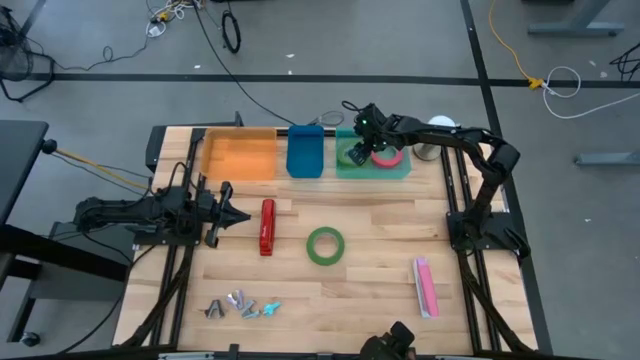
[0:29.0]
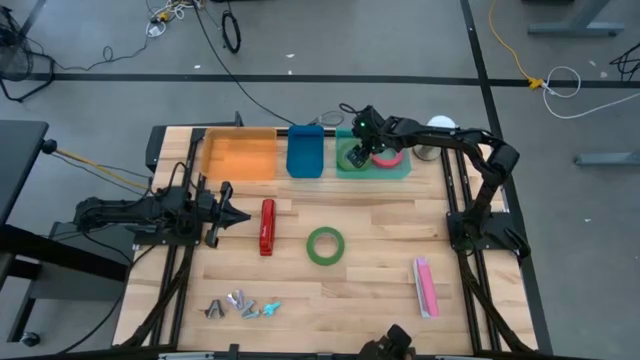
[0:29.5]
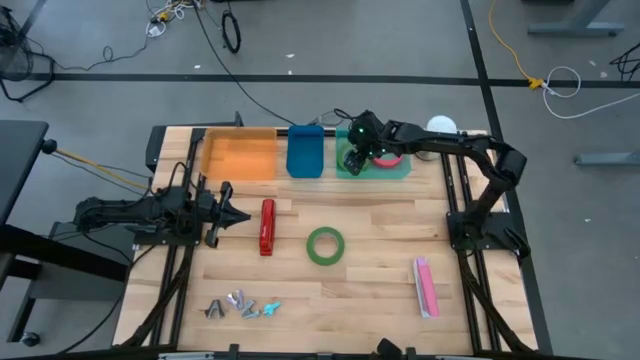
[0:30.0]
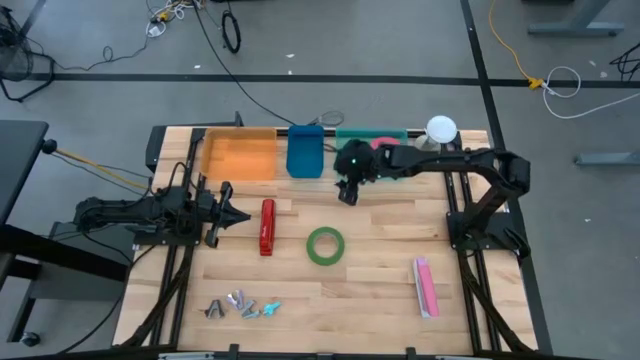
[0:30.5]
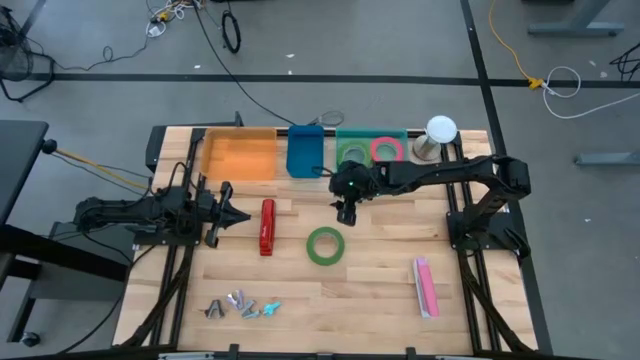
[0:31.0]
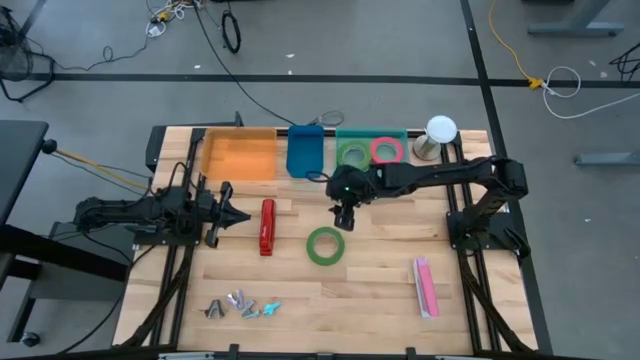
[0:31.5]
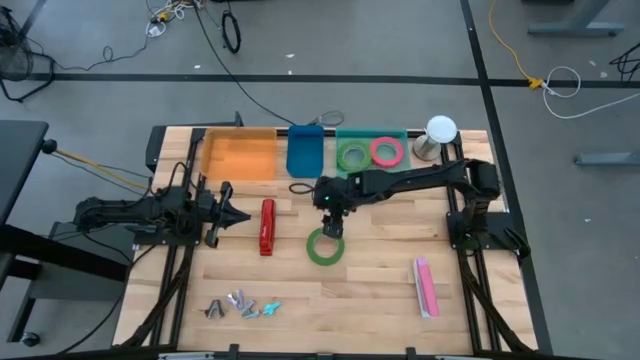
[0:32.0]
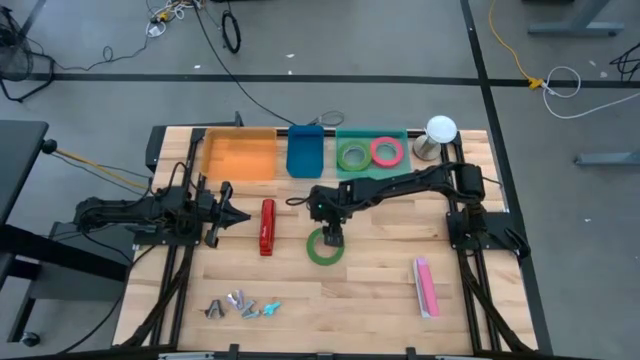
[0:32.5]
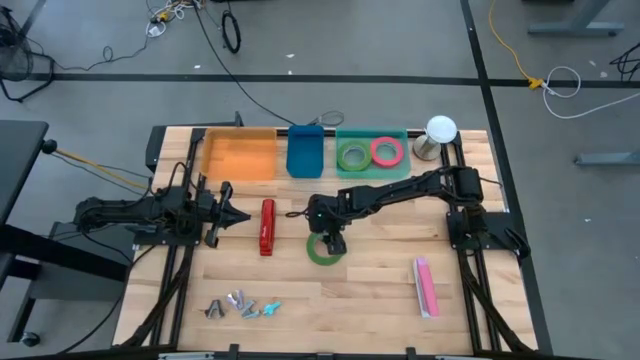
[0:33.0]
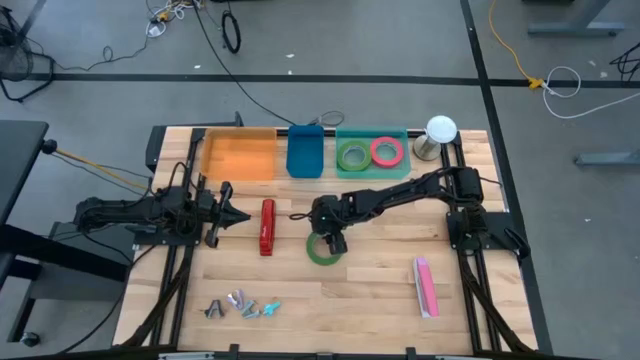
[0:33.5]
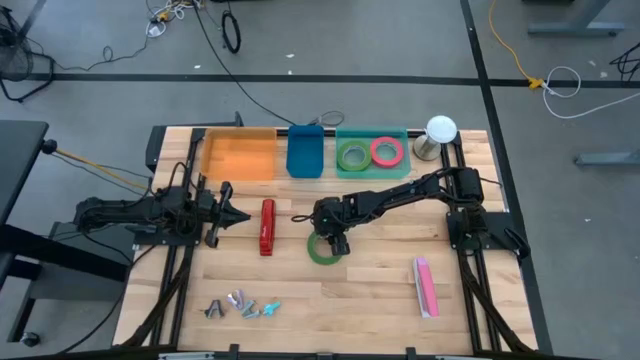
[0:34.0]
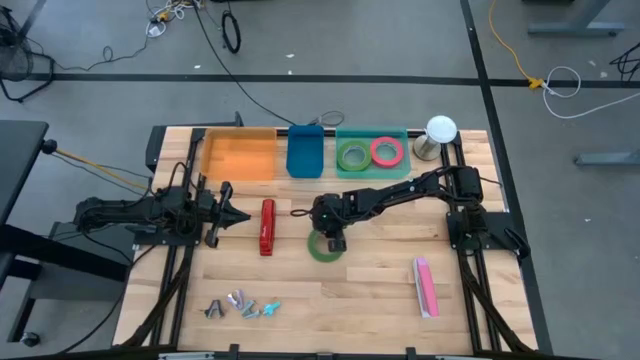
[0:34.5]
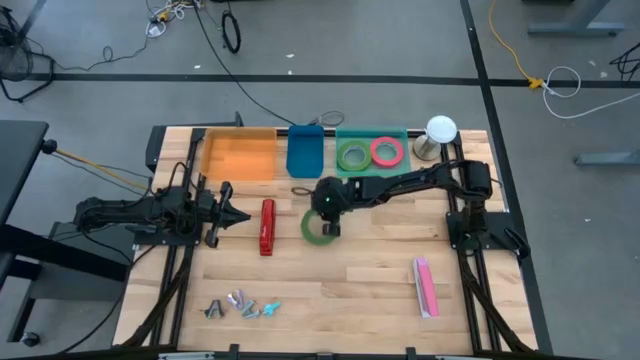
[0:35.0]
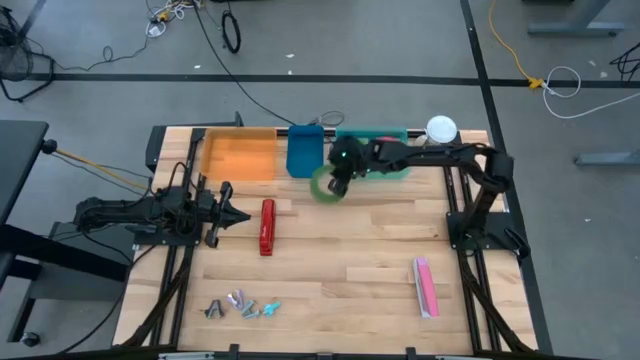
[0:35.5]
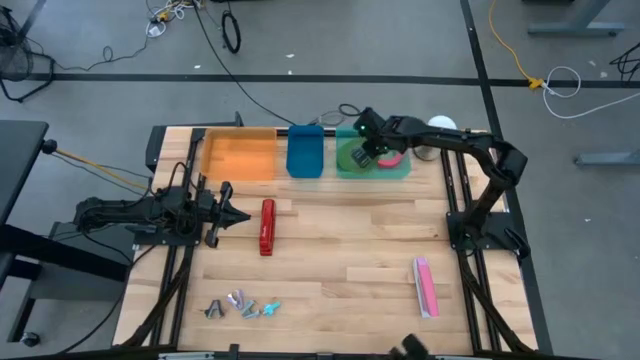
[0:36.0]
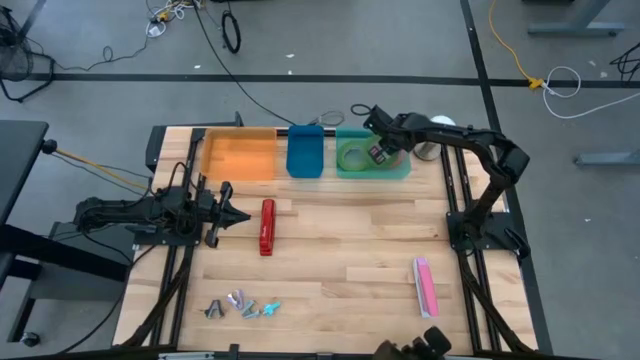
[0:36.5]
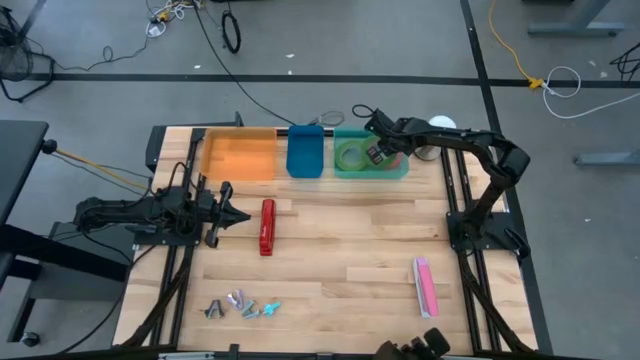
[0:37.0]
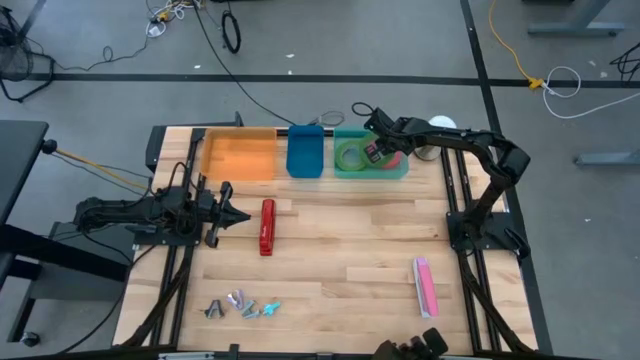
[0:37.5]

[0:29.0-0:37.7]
Task: Pick and place Stapler, Stapler remover, tape
Put the green tape into the light green bin

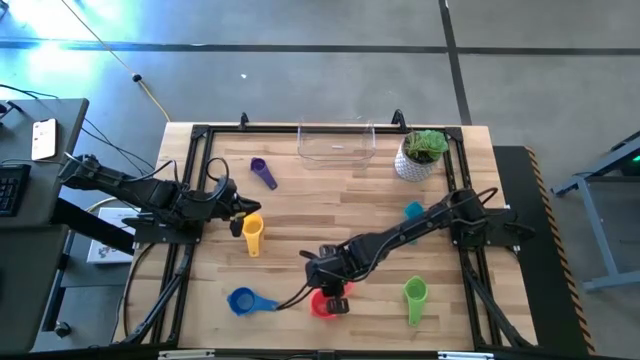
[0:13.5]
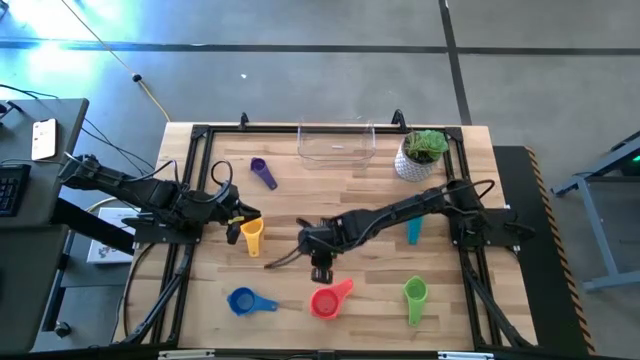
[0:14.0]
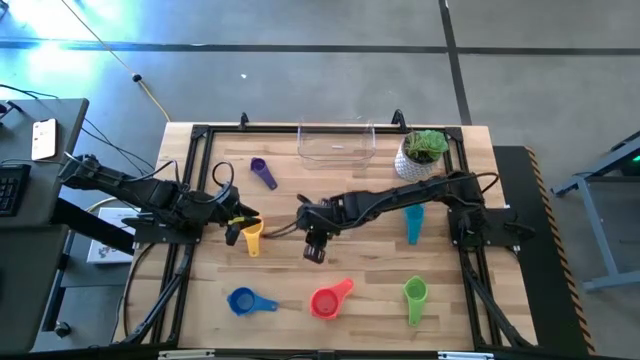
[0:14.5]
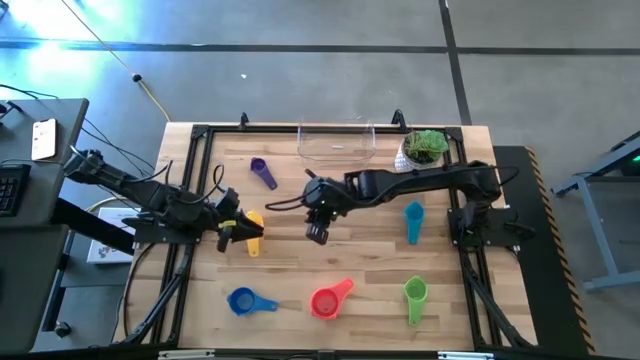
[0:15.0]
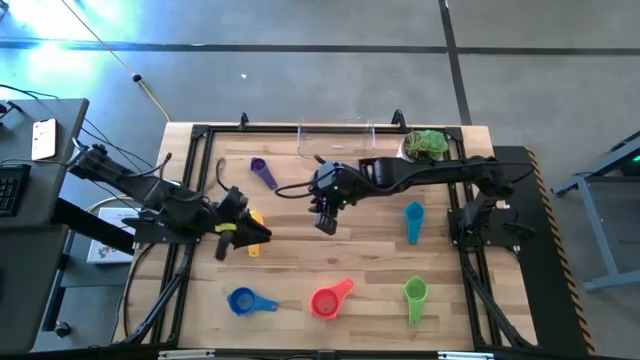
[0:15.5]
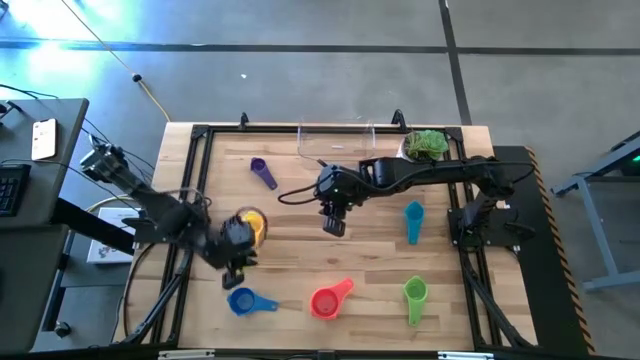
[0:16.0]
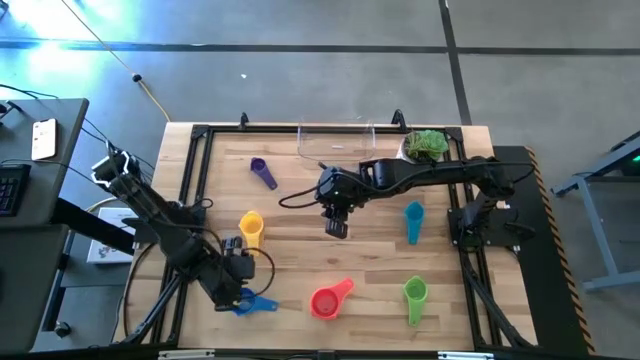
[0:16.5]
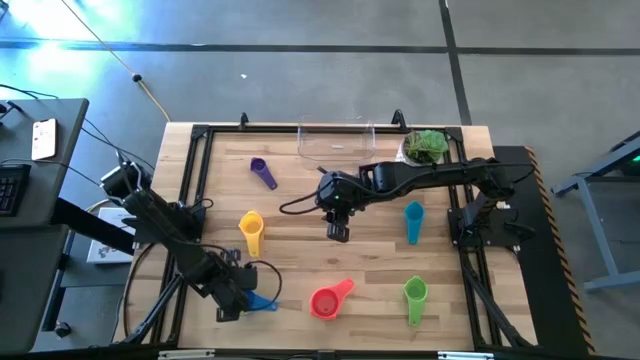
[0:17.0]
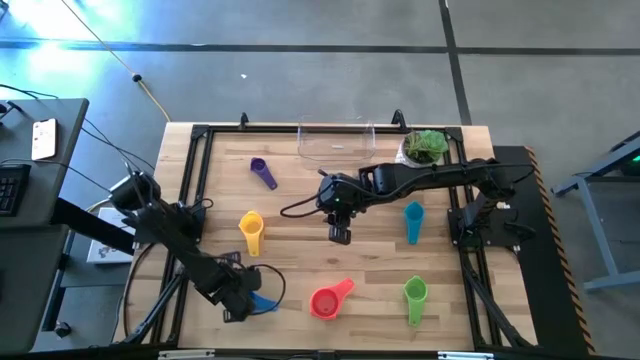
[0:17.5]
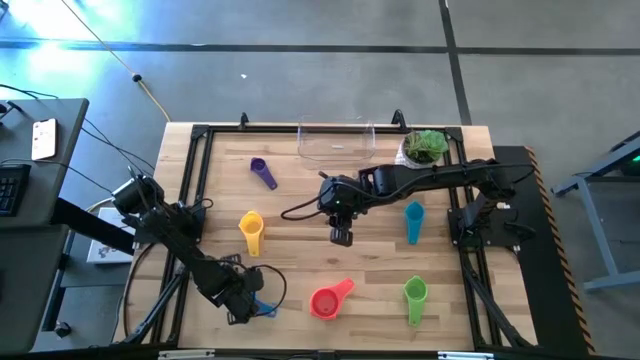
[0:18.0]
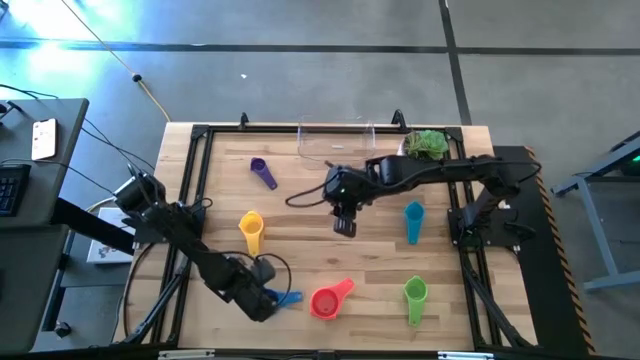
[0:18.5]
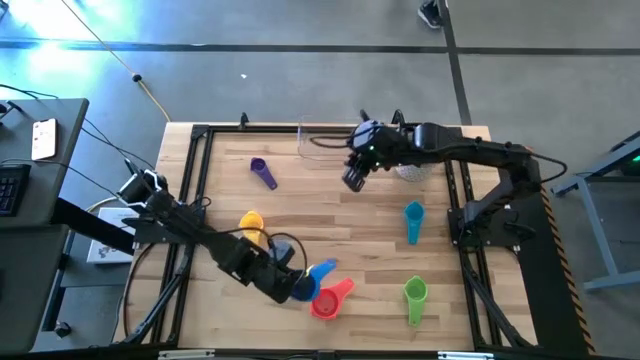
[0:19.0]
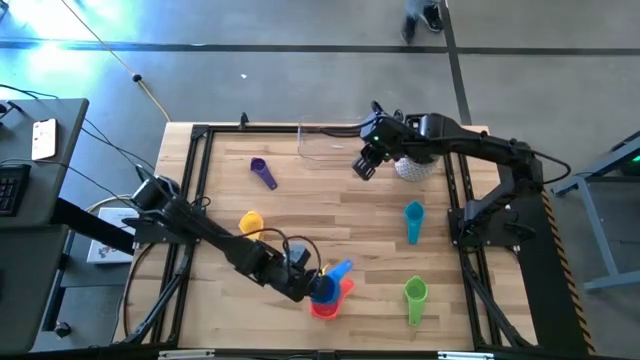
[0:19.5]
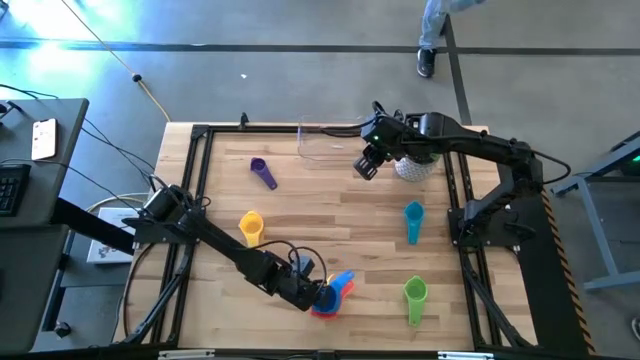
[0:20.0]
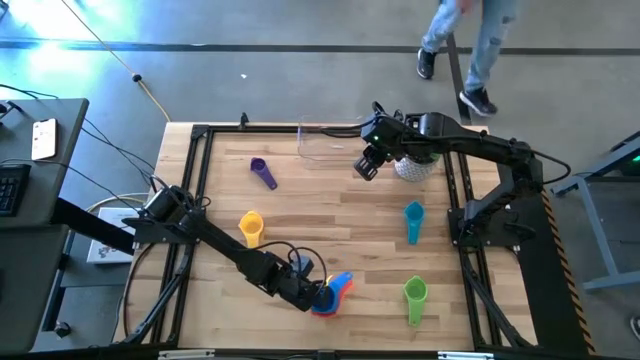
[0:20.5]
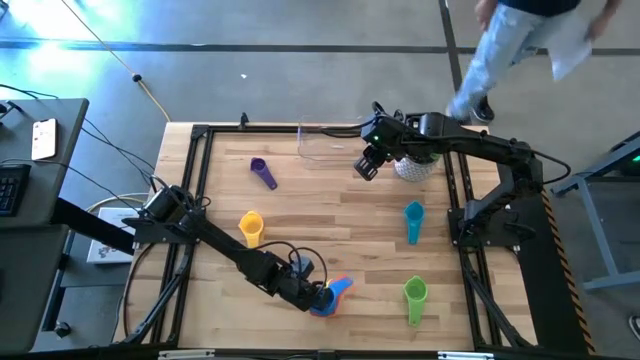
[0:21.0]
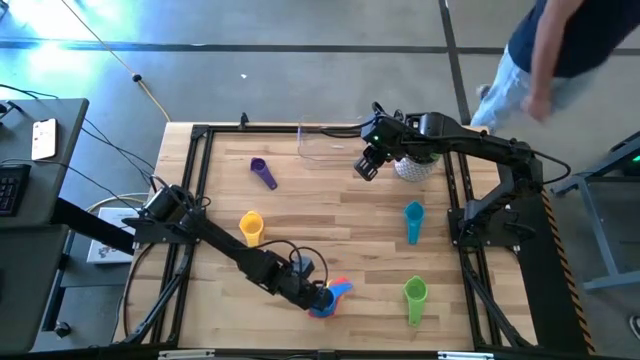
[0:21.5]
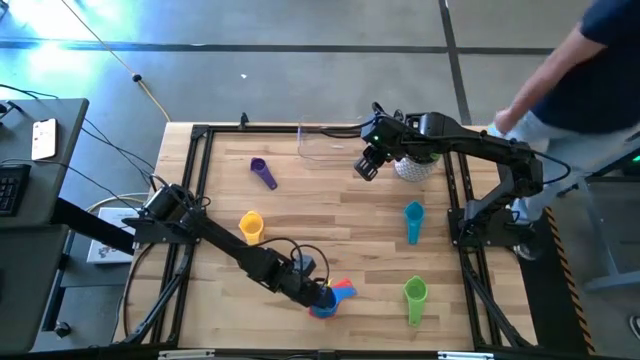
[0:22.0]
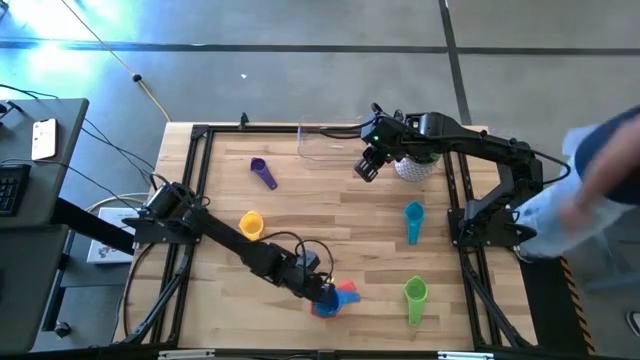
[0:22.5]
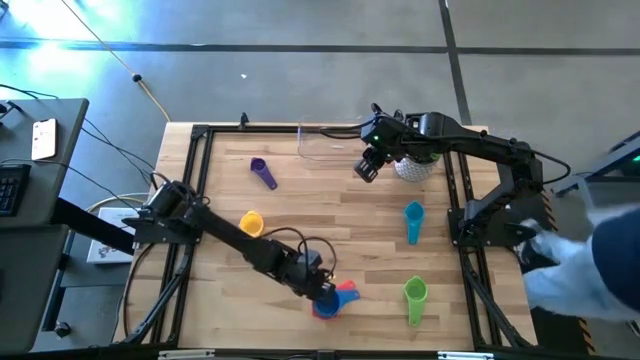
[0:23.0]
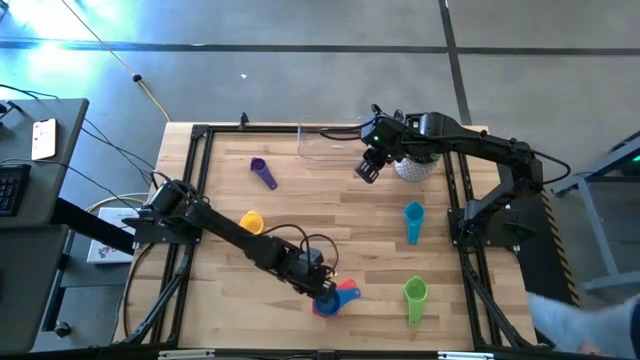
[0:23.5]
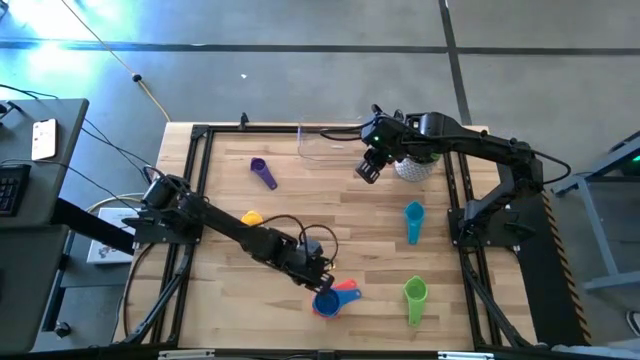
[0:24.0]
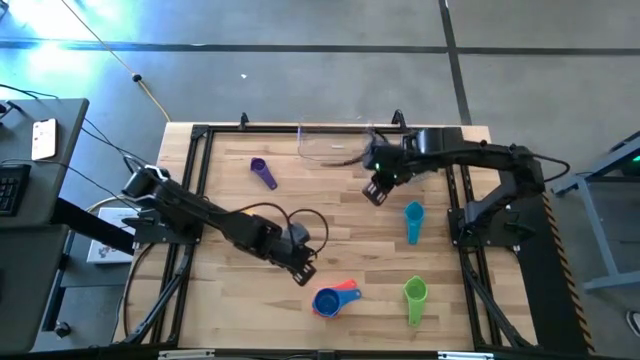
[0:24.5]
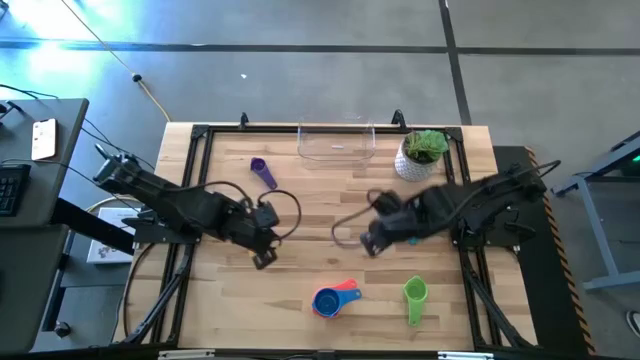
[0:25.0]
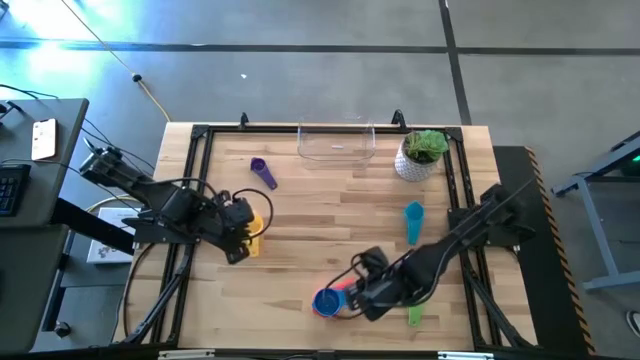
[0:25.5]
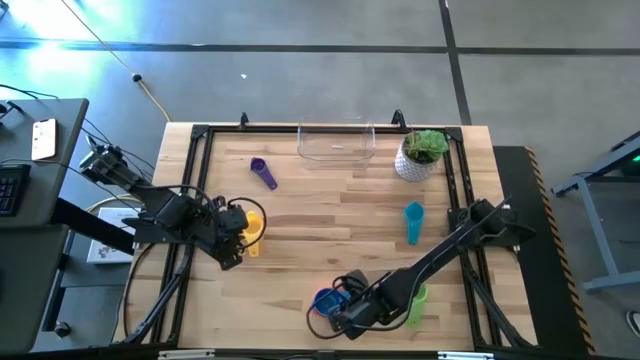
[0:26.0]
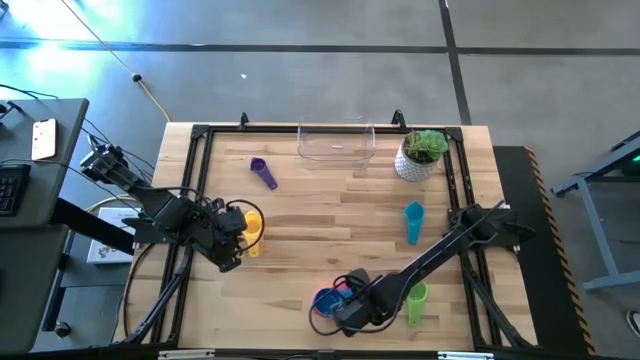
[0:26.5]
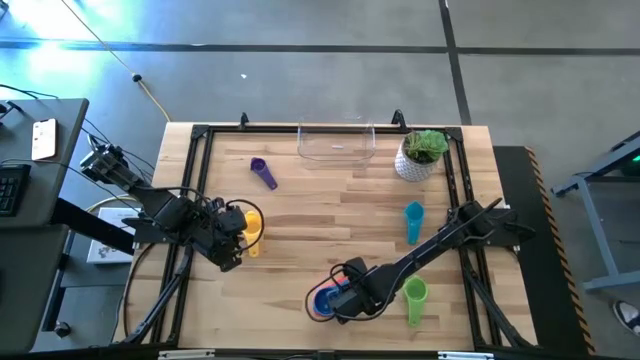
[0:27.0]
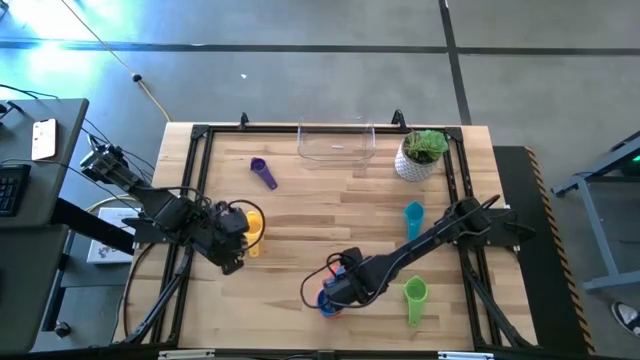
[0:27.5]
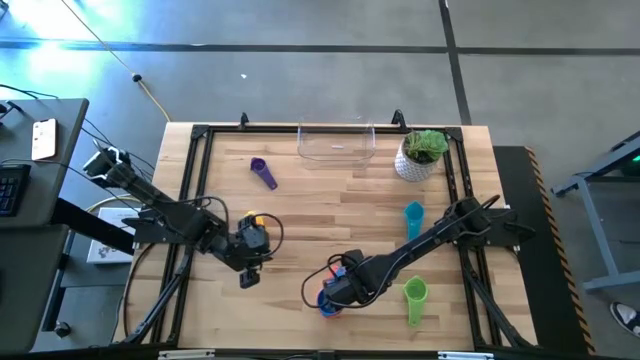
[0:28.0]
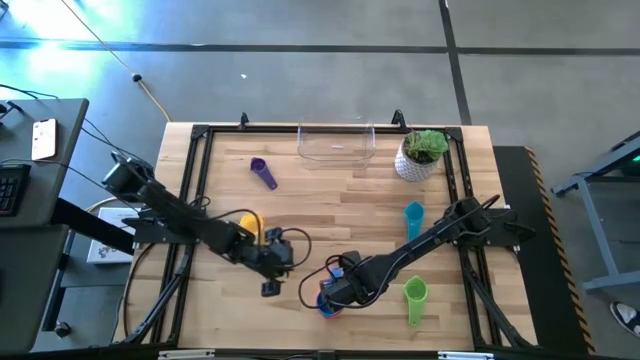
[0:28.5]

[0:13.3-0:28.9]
Task: Nest measuring cups in basket
Stack the blue measuring cup on top of the pink measuring cup
